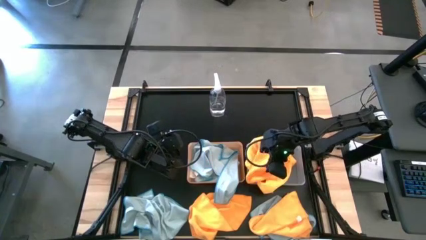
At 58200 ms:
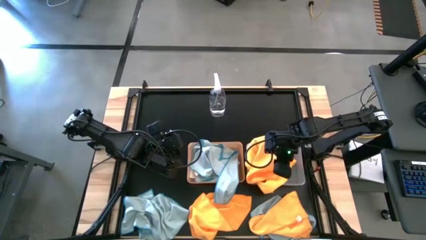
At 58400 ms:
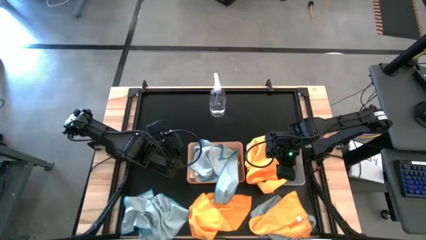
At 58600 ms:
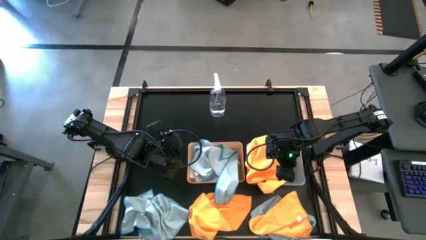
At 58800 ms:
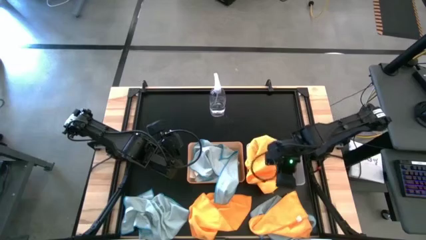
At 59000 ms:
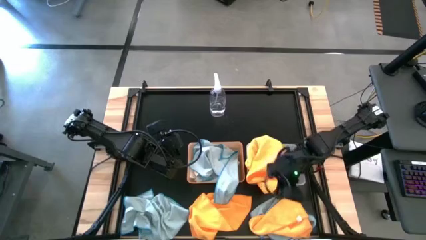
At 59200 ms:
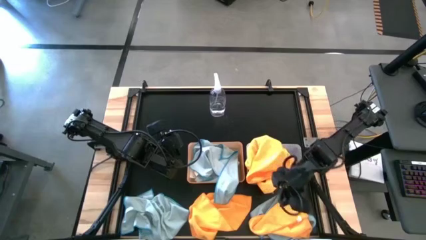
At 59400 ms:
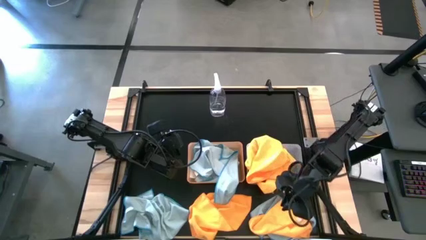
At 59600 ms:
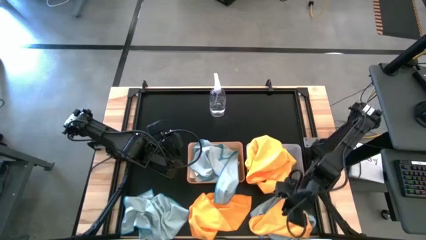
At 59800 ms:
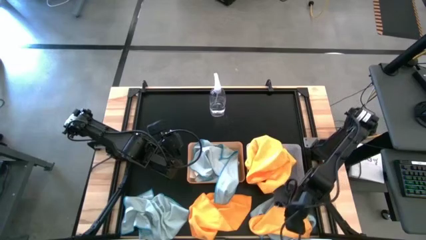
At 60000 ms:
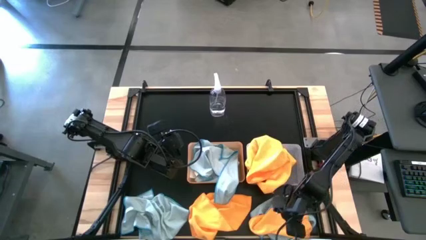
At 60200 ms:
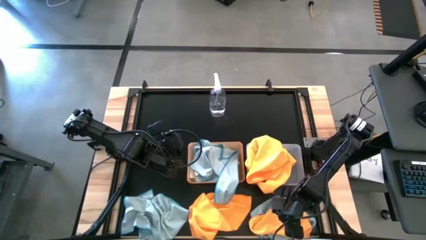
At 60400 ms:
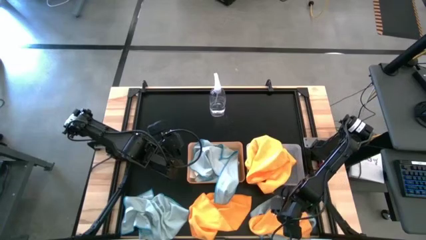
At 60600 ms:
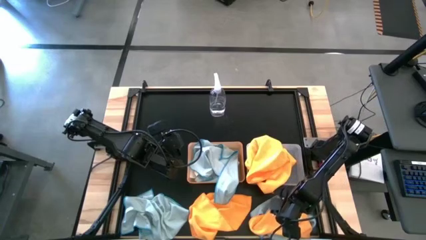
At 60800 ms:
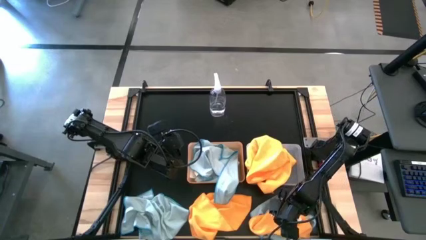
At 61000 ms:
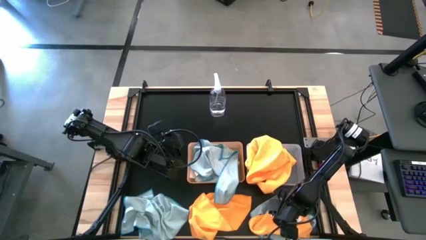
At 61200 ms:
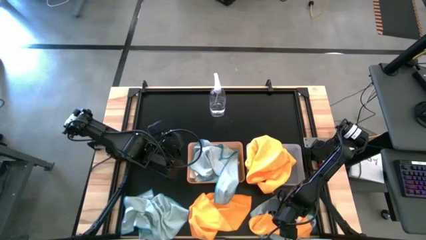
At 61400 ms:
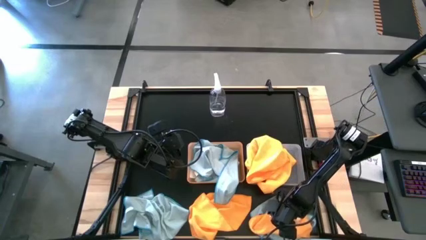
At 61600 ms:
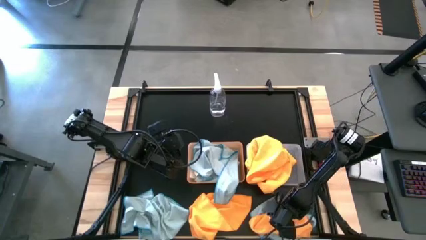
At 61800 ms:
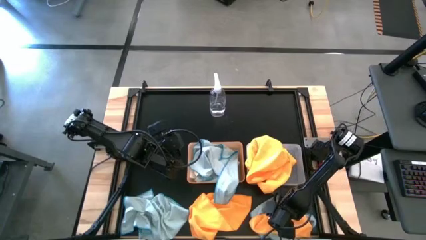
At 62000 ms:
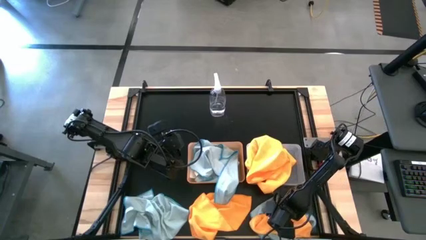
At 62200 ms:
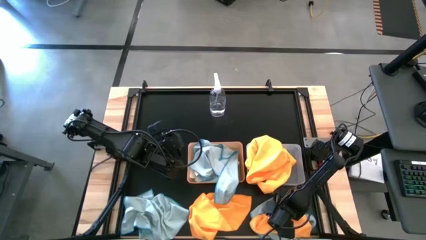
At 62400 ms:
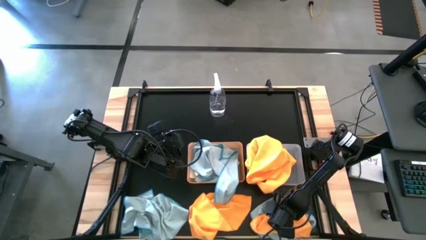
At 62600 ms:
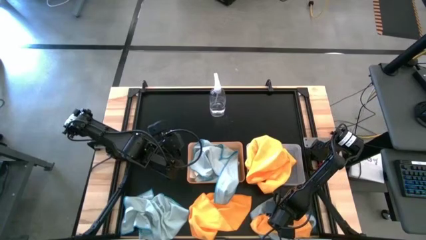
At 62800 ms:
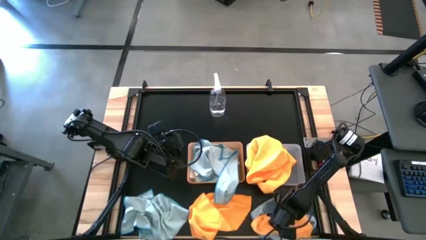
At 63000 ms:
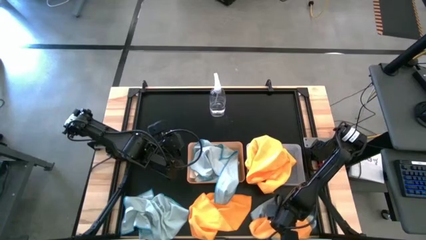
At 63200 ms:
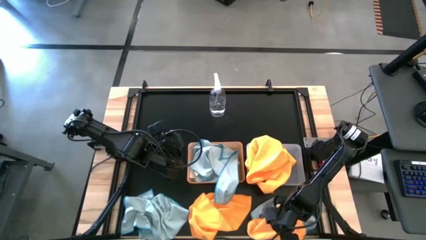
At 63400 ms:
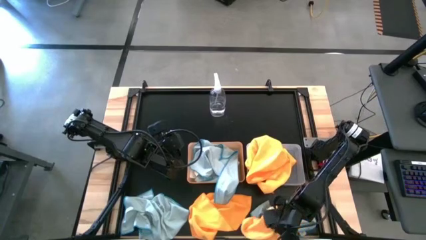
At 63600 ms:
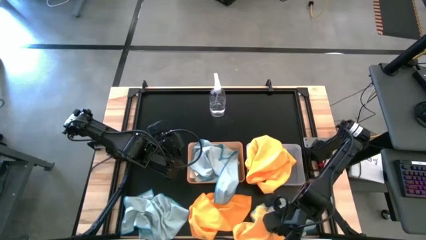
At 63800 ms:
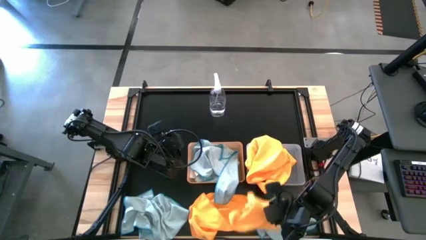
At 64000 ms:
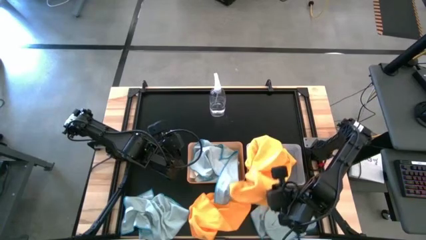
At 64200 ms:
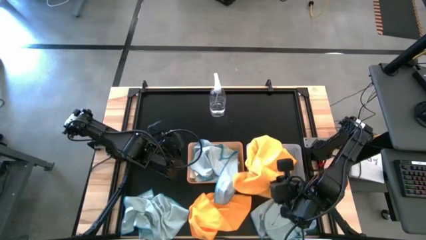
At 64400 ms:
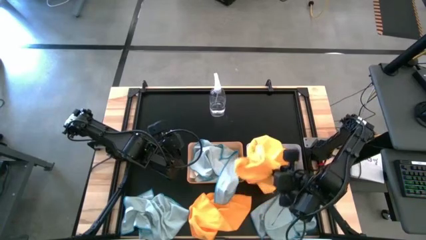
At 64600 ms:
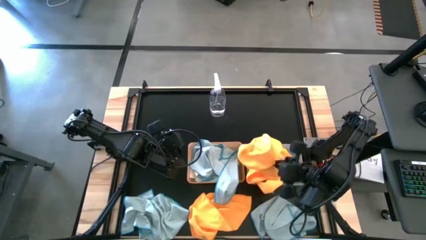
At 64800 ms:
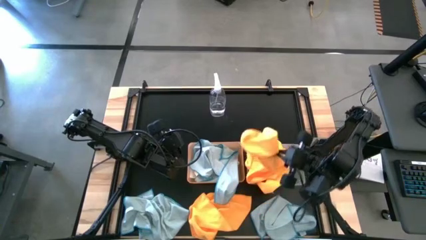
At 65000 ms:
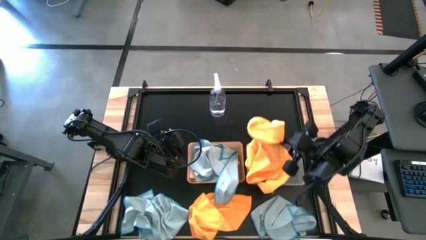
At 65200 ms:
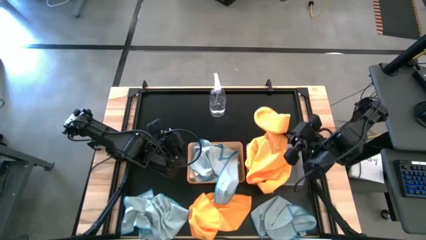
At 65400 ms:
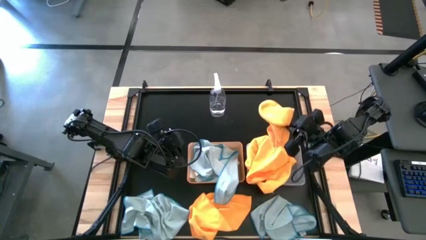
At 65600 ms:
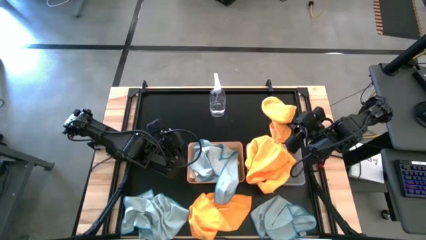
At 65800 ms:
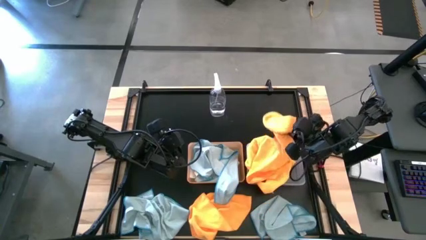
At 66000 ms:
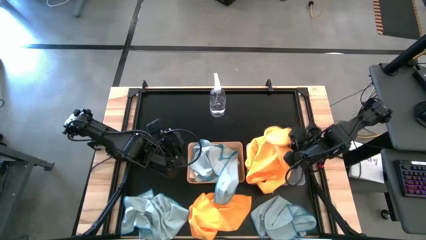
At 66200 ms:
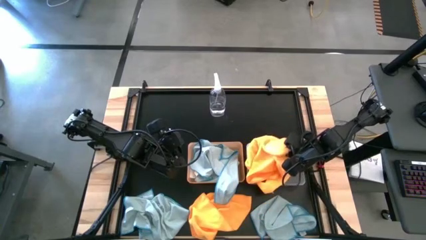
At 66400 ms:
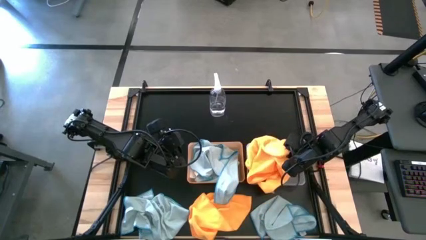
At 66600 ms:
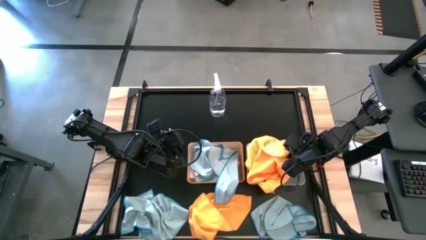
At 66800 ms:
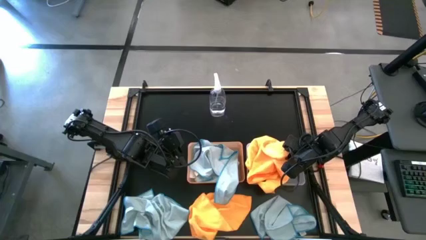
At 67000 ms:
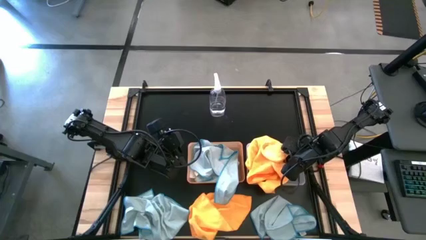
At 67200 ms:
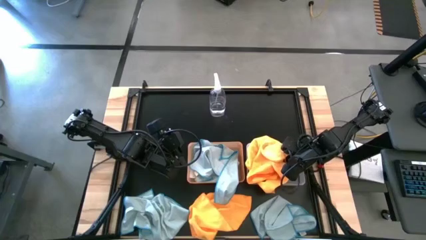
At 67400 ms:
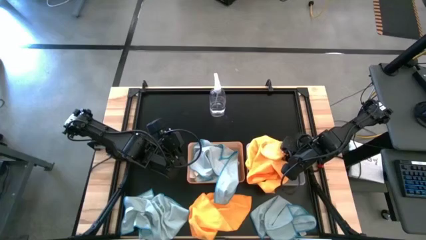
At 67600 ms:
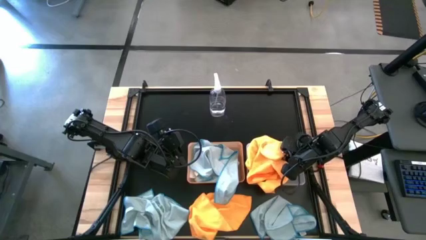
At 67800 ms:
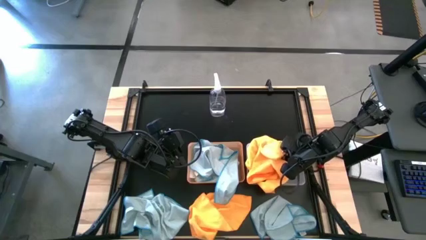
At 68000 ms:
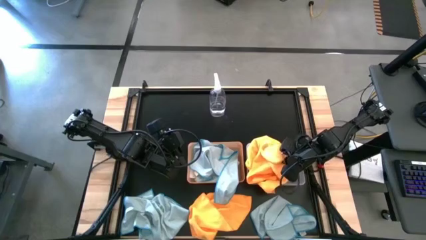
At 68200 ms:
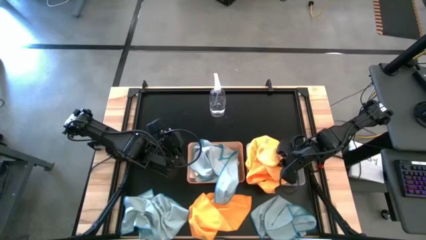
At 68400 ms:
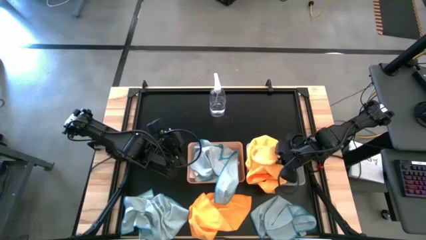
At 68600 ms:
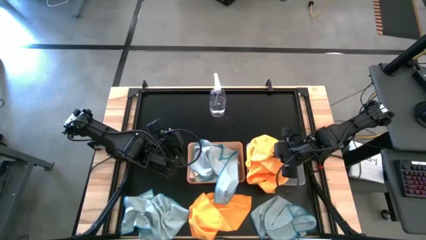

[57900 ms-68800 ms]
Task: Sort microfiber towel by color & place in baskets
Put the orange towel into the transparent bin
